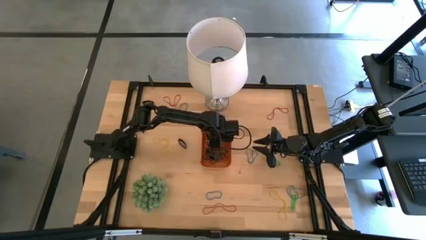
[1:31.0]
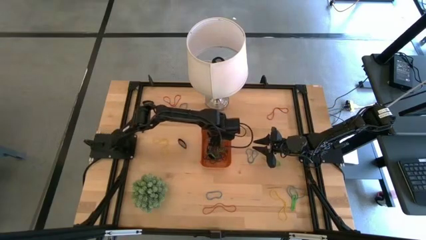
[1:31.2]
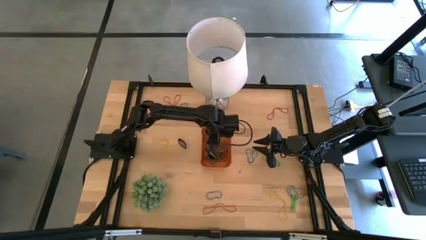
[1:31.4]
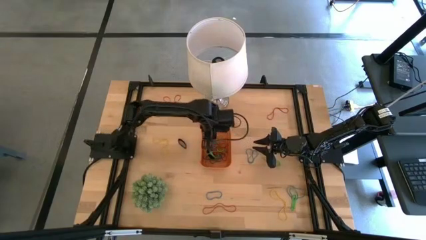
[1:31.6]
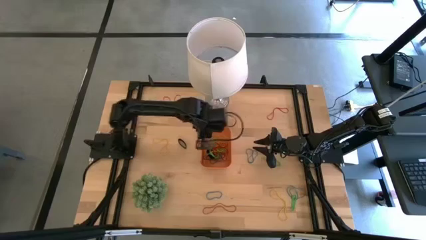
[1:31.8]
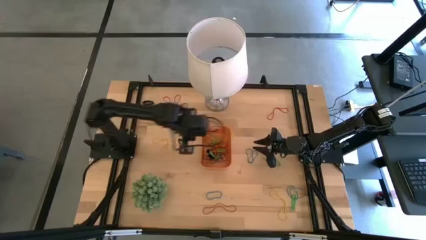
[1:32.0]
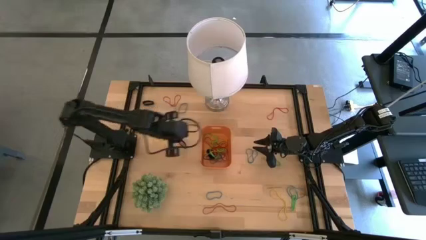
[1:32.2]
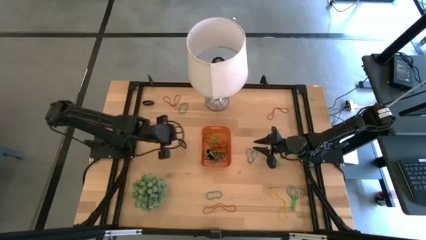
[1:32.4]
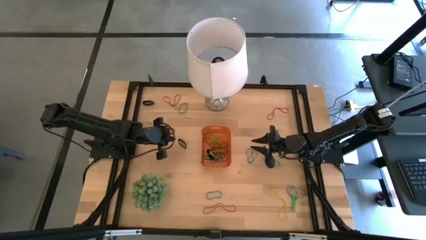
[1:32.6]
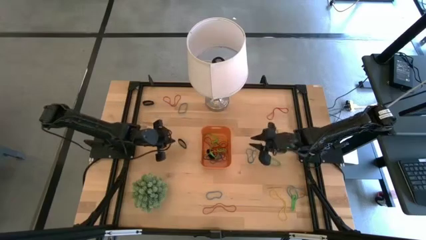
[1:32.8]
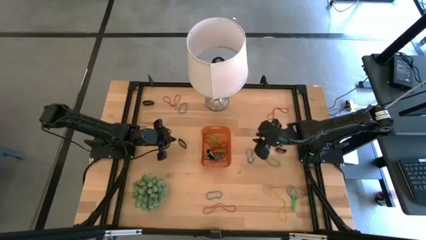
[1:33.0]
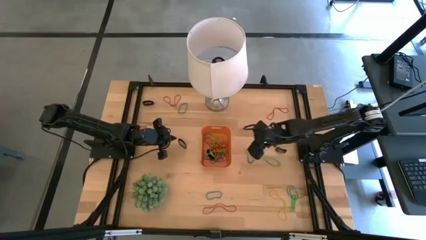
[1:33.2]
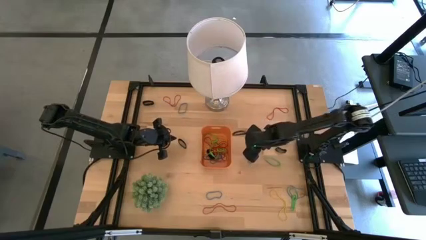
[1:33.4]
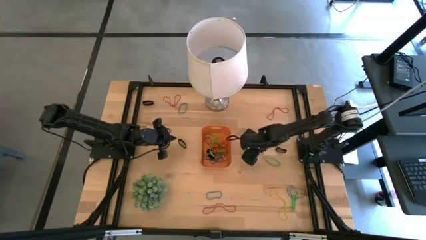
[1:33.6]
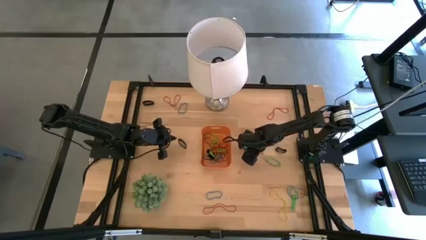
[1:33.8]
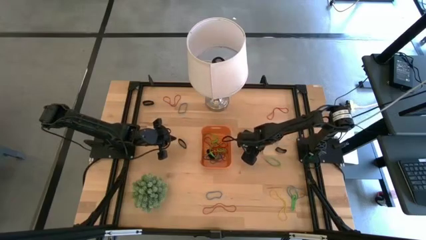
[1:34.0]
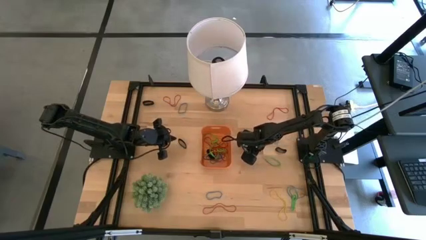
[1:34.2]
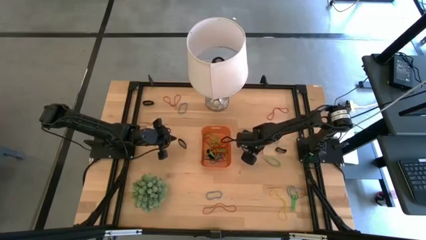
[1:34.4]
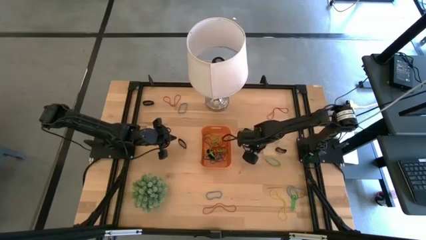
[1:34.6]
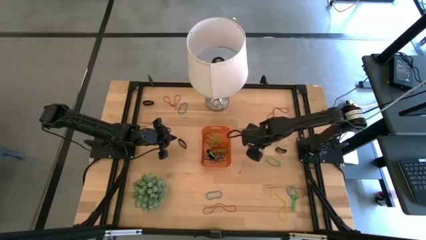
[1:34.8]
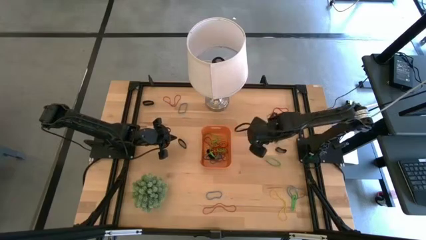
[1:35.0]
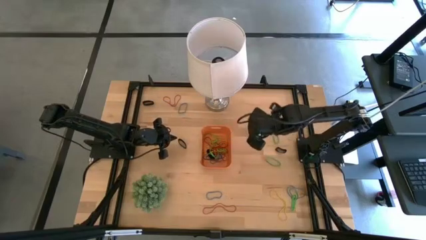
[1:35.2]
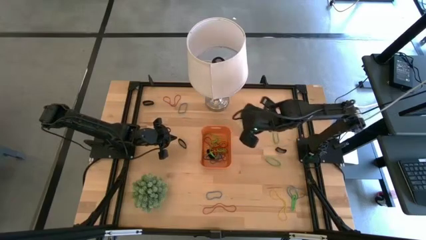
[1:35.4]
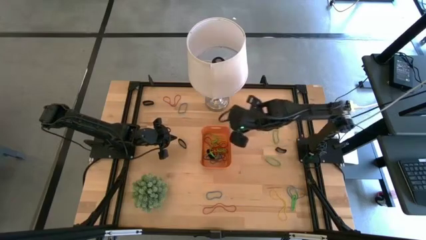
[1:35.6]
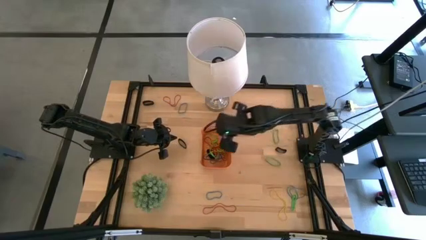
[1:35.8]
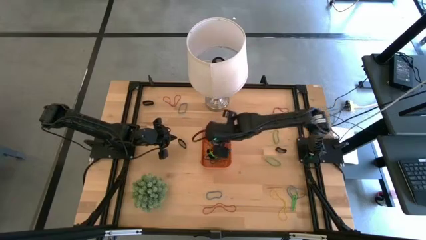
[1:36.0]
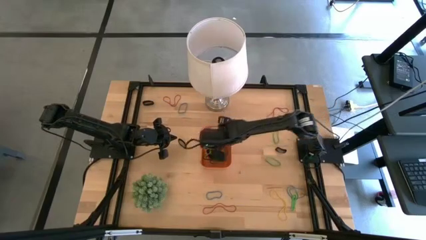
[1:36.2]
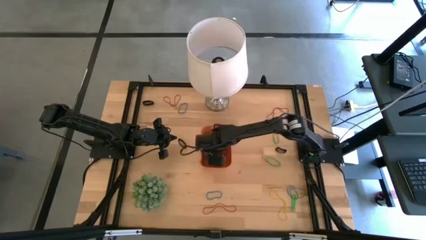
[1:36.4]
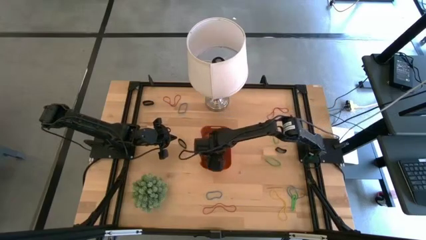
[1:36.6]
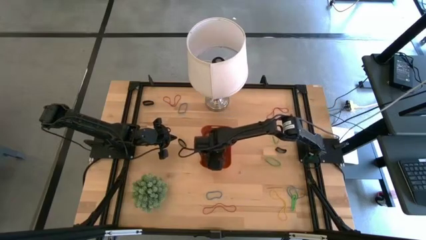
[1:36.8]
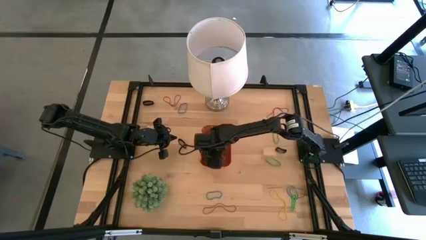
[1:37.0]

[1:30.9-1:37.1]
Task: Pick and place rubber bands into bin
Put the blue rubber band into the orange bin

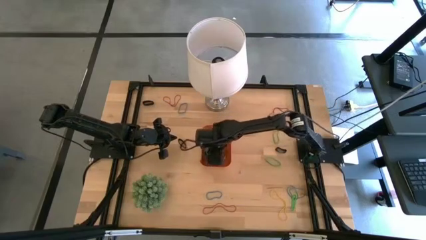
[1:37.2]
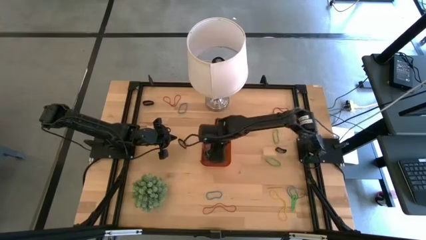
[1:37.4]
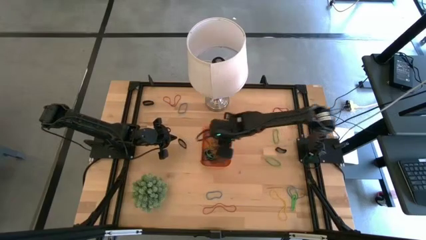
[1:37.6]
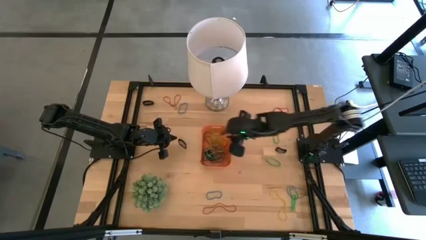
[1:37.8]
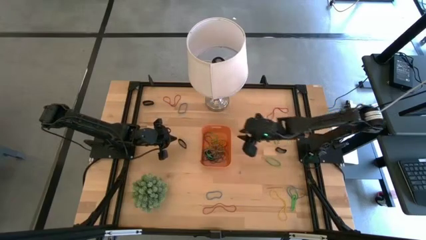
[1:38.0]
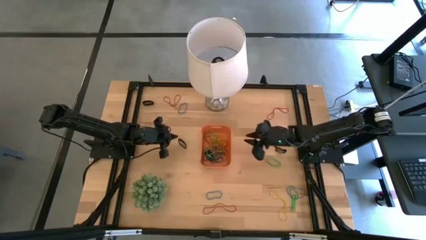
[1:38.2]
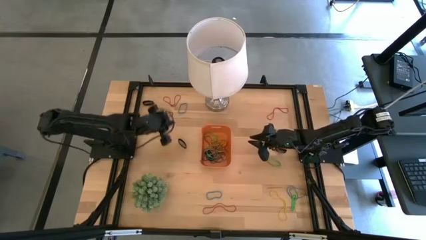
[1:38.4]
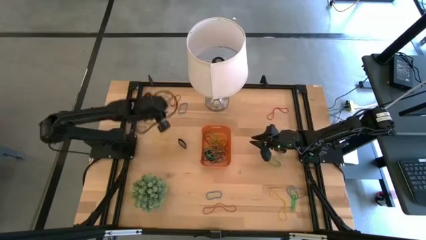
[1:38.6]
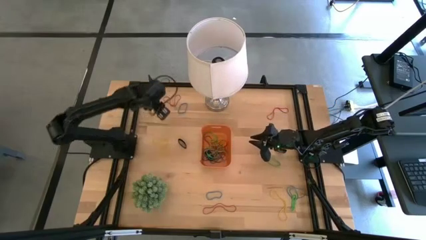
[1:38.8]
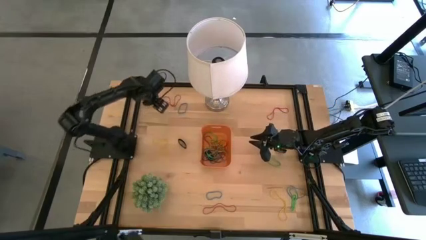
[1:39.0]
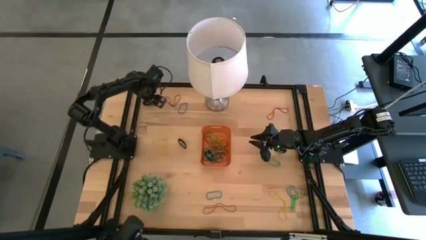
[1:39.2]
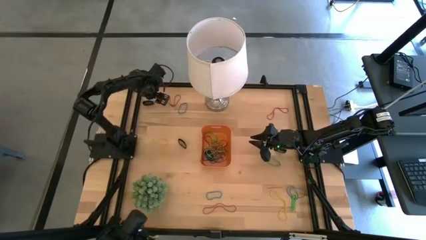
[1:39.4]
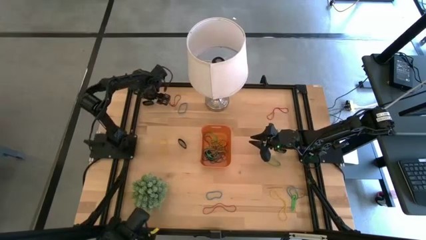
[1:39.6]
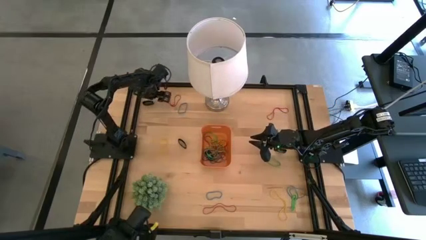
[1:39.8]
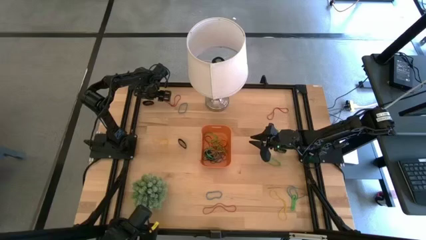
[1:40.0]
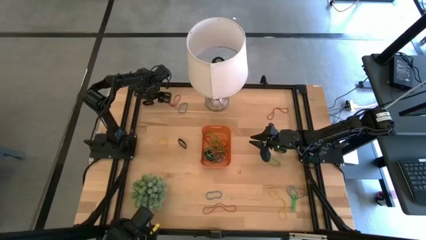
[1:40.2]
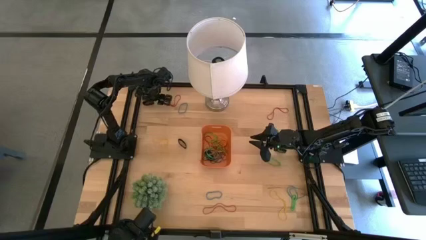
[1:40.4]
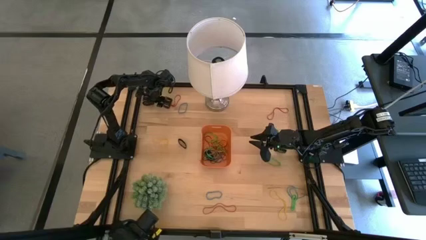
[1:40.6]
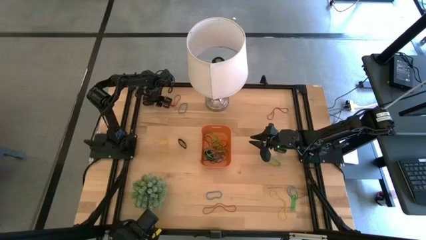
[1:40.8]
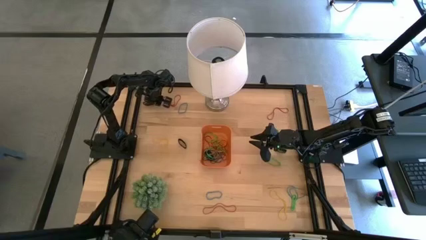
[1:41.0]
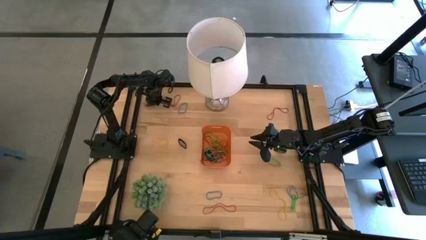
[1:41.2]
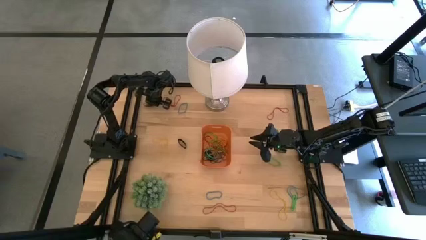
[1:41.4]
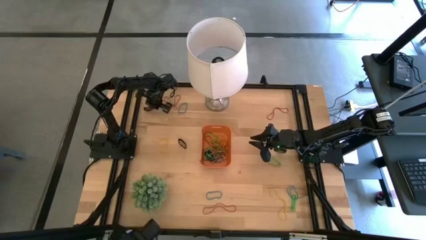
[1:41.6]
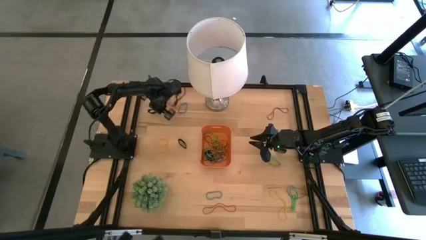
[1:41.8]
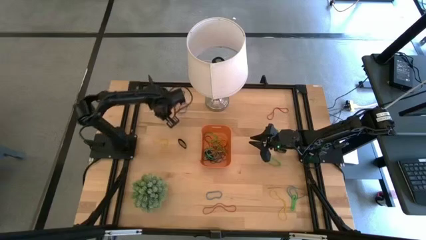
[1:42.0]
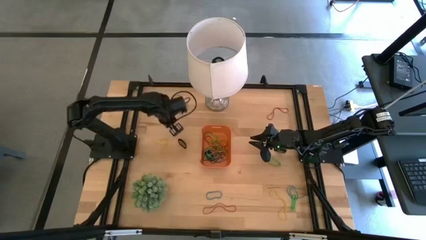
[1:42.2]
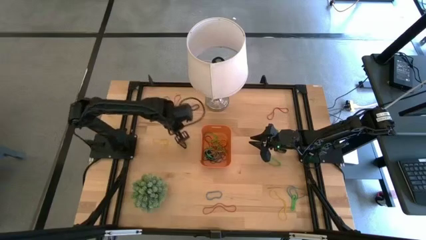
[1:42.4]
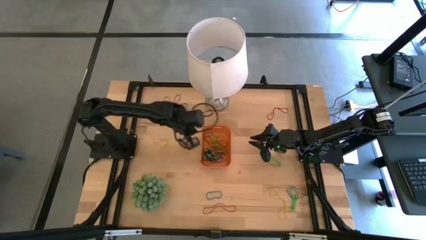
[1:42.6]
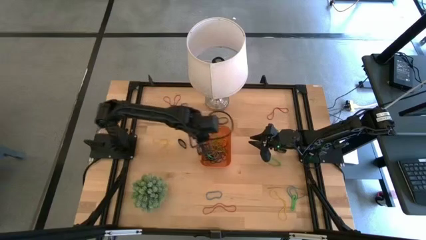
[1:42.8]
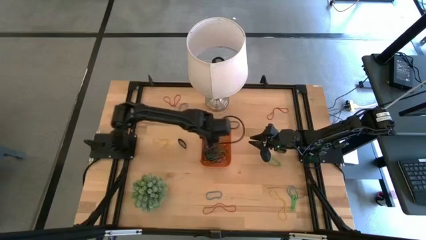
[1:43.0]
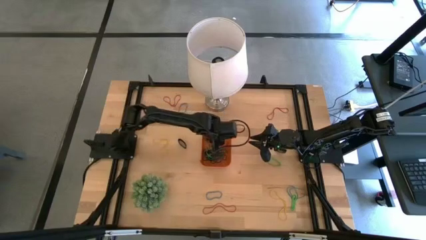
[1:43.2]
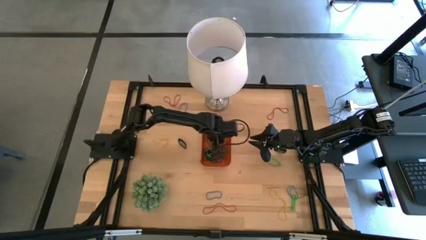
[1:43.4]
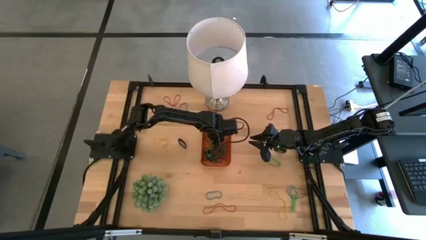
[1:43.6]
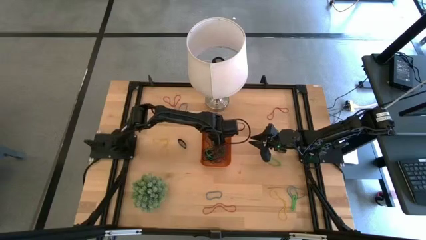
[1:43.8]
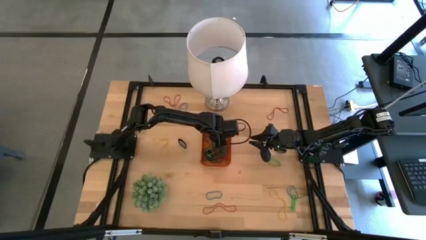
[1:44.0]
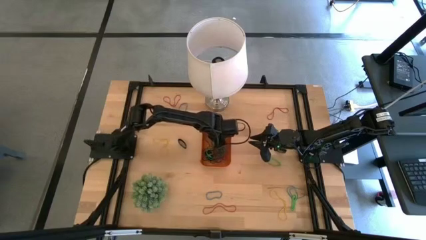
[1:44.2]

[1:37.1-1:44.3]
Put the black rubber band into the orange bin

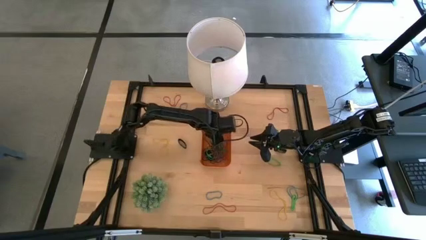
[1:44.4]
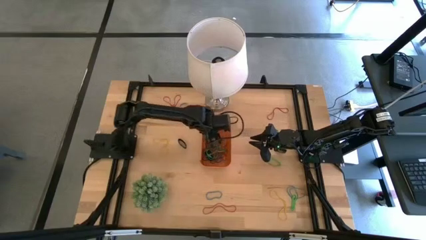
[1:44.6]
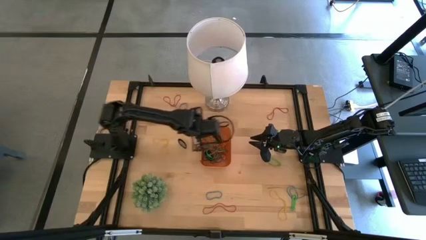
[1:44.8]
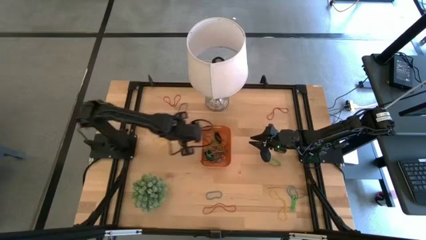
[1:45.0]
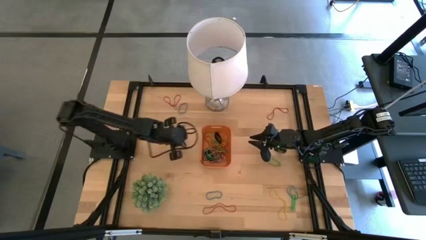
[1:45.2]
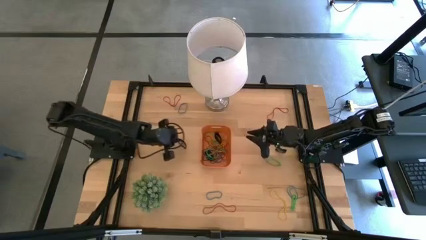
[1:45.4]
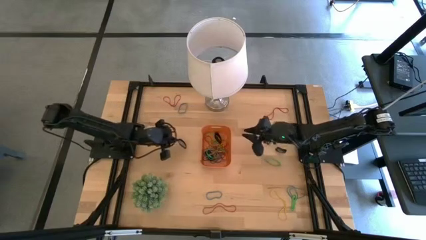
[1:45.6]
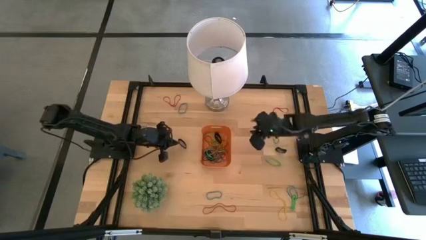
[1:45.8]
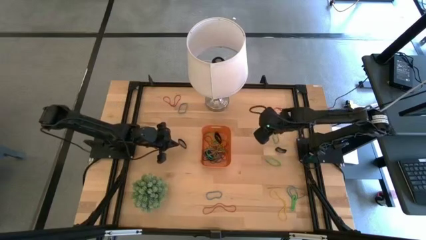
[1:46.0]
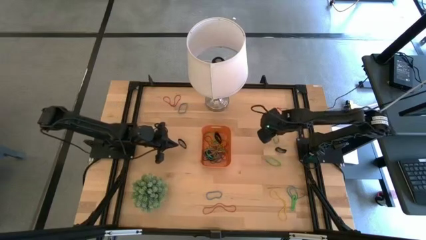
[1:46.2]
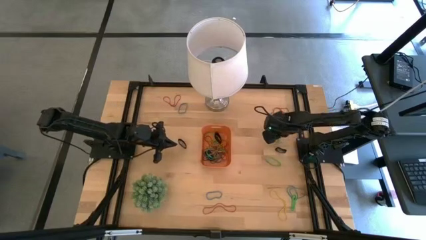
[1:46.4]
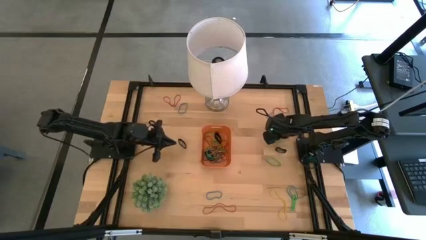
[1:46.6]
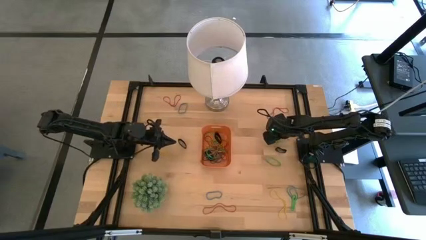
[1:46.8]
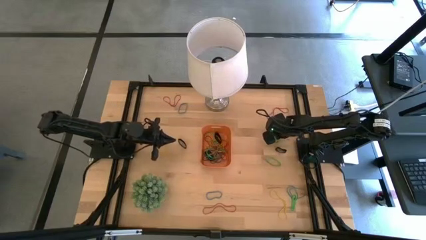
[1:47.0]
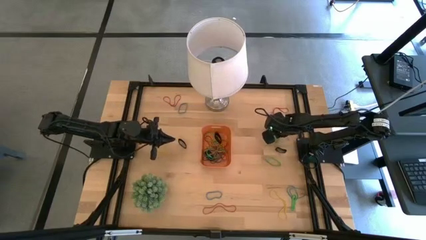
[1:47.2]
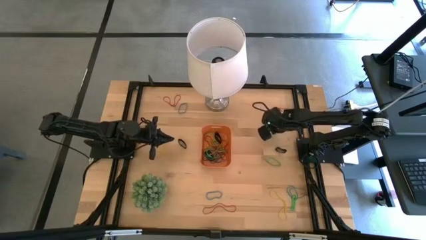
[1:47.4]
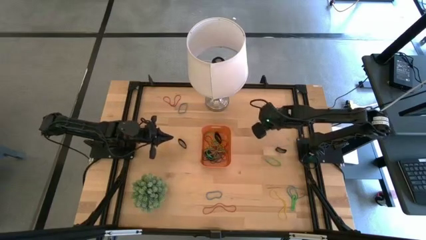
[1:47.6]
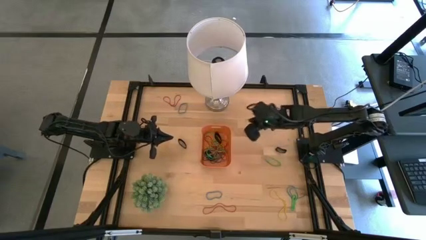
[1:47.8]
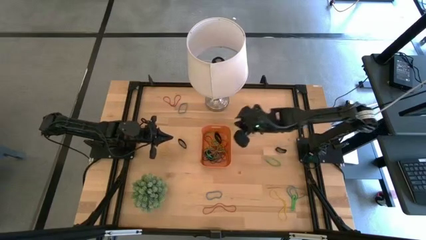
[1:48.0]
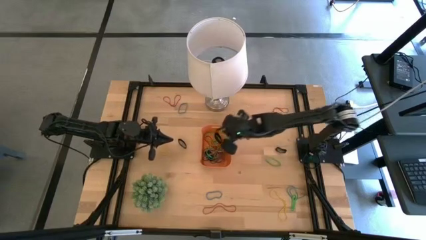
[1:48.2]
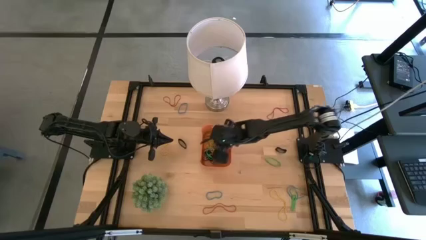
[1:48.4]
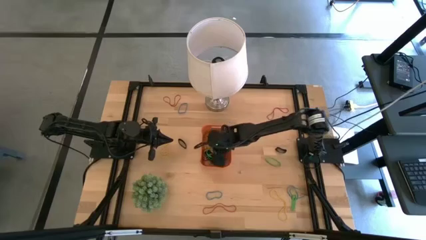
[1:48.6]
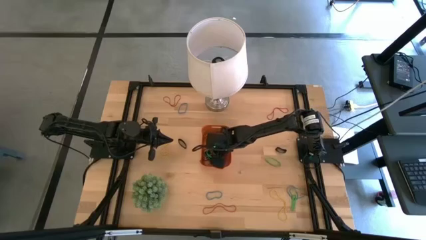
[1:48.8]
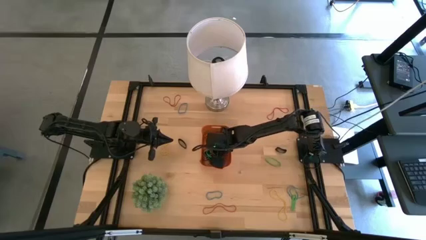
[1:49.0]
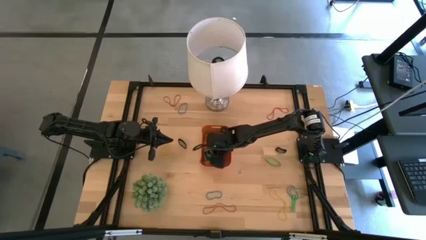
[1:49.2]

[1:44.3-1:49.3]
Put the green rubber band into the orange bin
